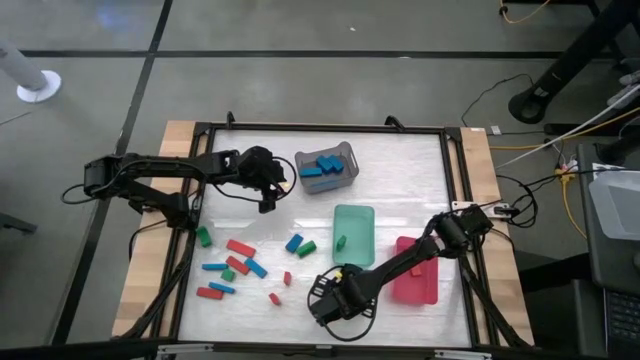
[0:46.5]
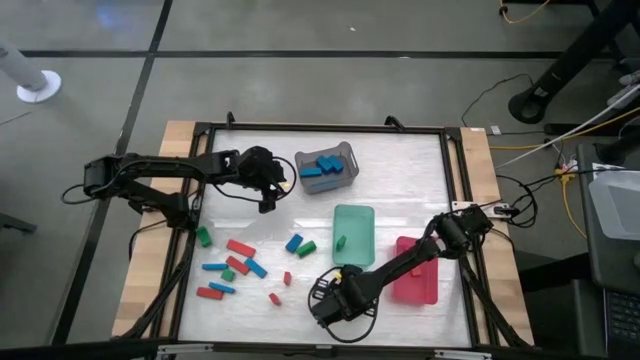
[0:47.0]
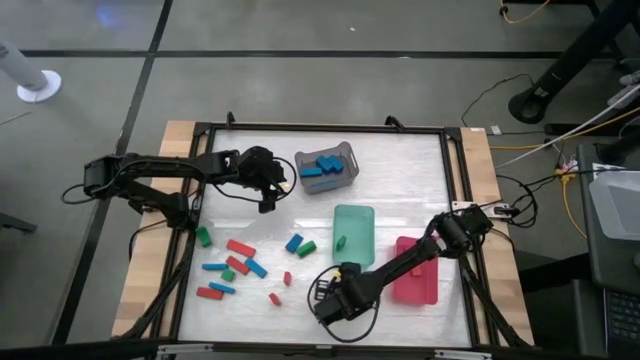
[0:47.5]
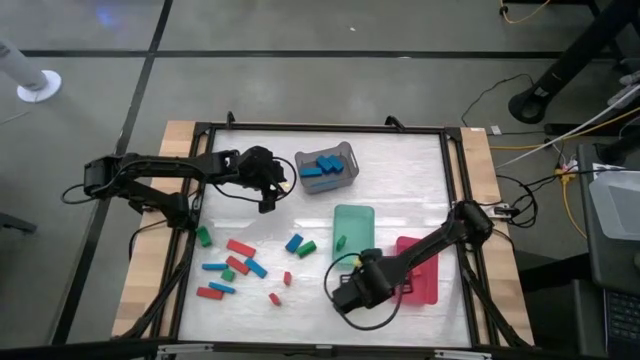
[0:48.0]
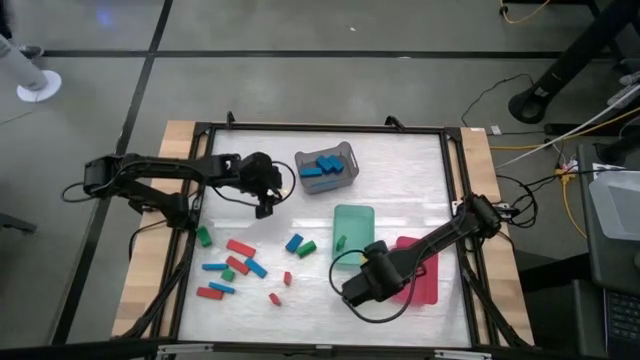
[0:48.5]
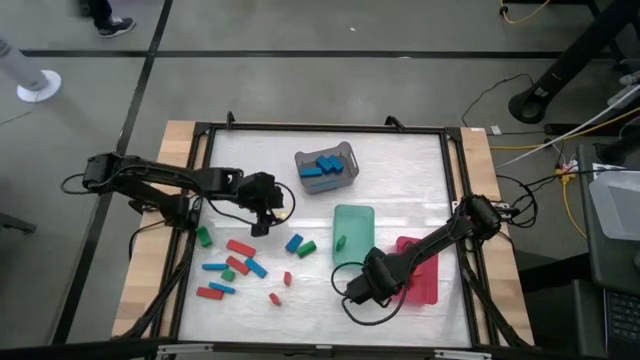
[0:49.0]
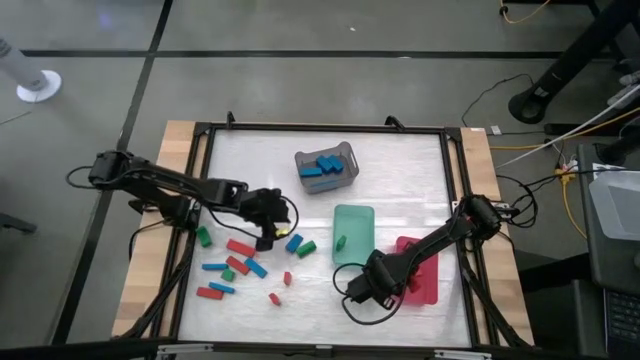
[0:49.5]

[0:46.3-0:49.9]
Task: Sort blocks
Put the red arch block into the pink bin

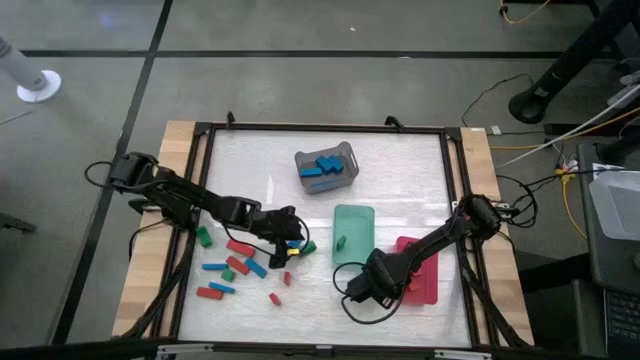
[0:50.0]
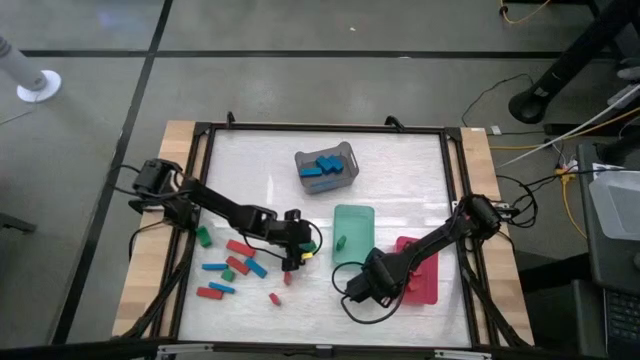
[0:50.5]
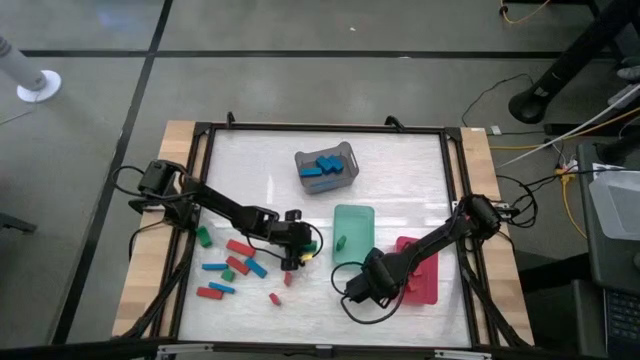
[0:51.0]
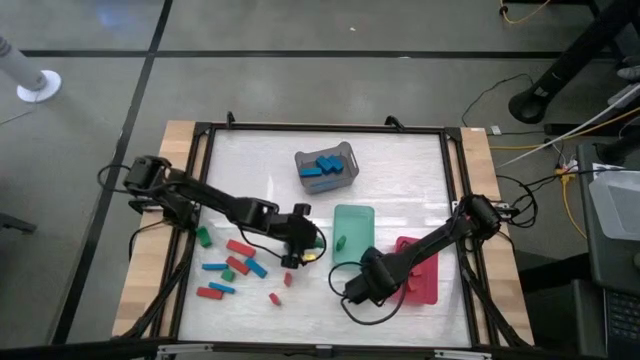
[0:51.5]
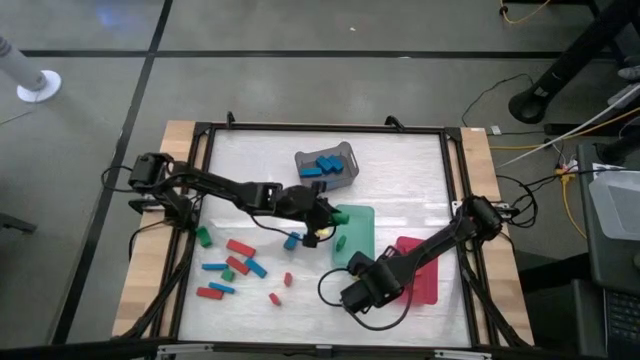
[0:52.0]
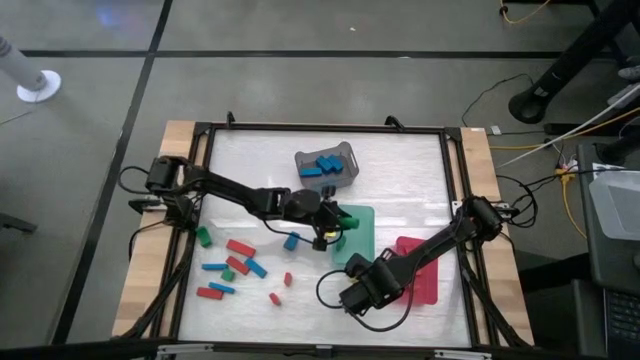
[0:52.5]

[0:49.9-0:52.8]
Put the green cylindrical block into the green bin

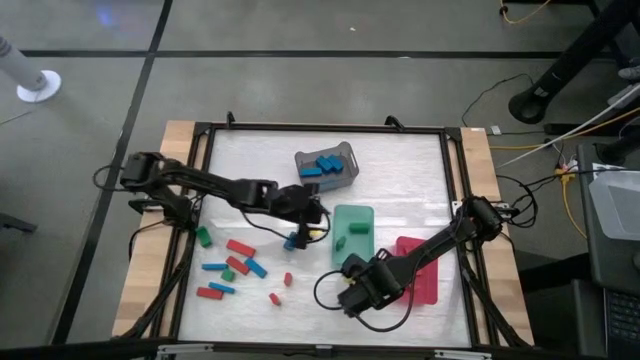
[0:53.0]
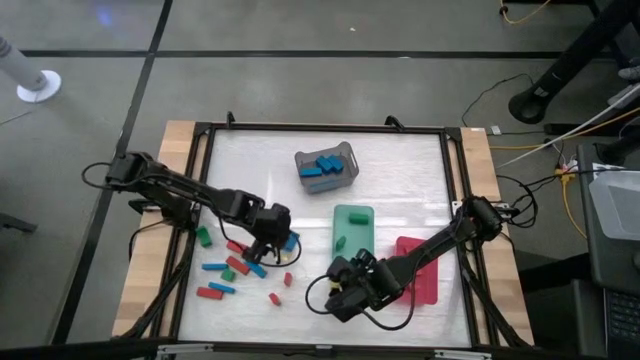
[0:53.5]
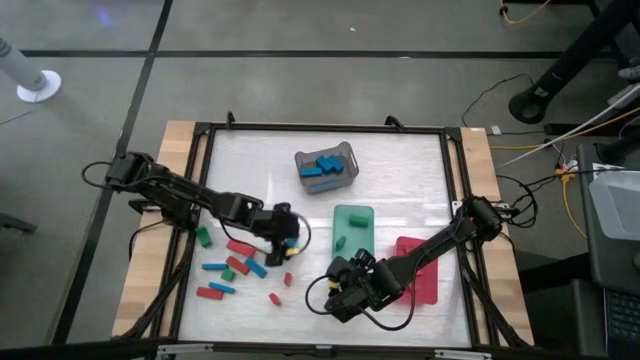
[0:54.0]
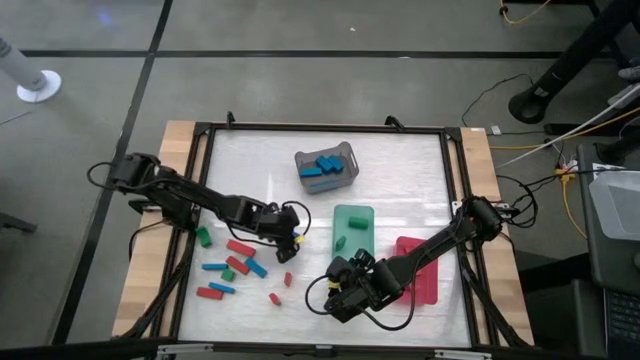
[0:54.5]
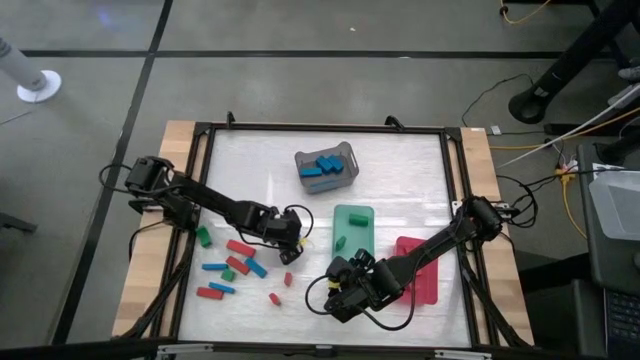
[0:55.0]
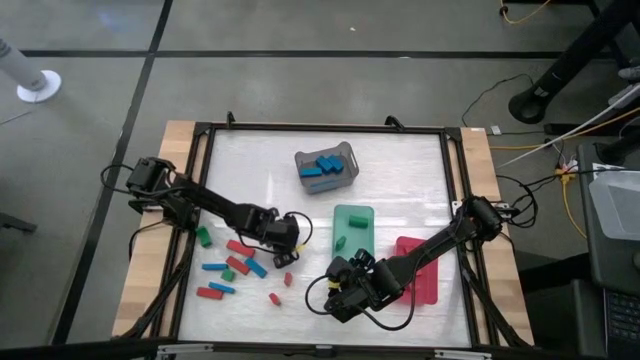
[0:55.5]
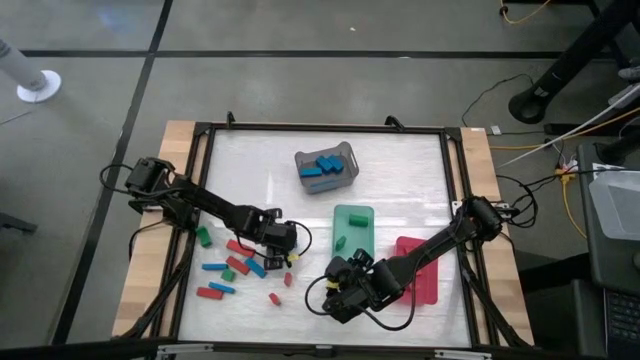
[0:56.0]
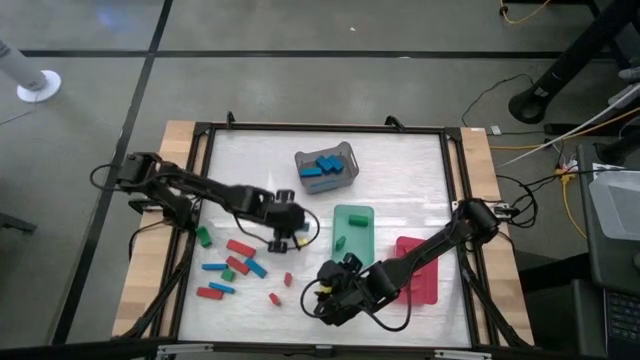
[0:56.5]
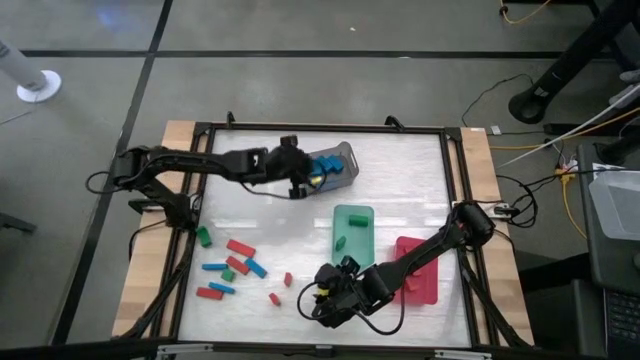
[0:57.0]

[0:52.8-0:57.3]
Put the blue triangular block into the gray bin

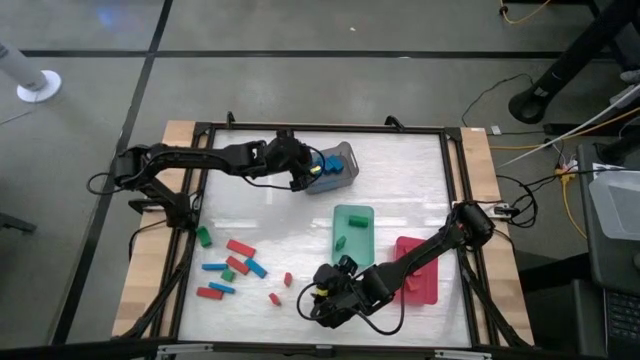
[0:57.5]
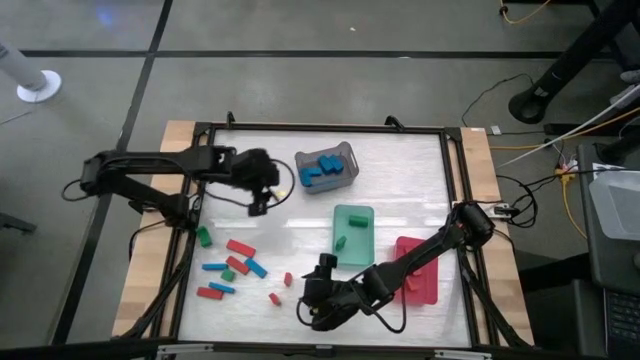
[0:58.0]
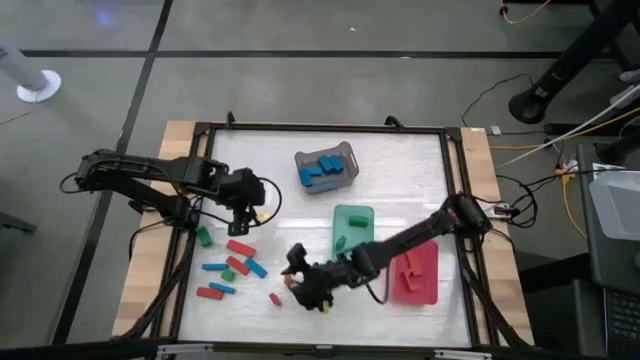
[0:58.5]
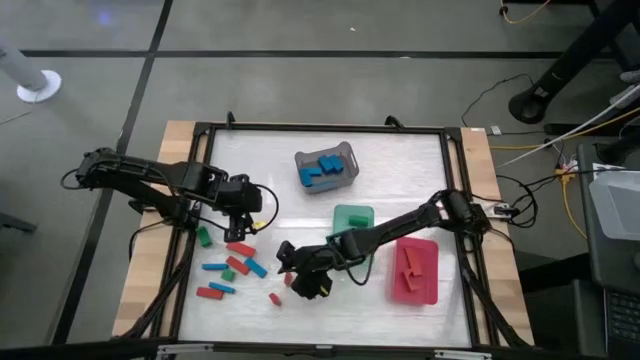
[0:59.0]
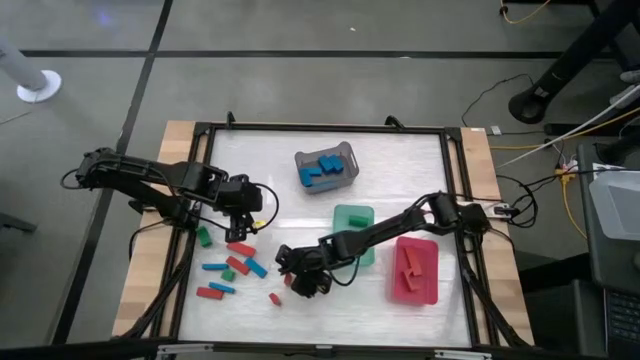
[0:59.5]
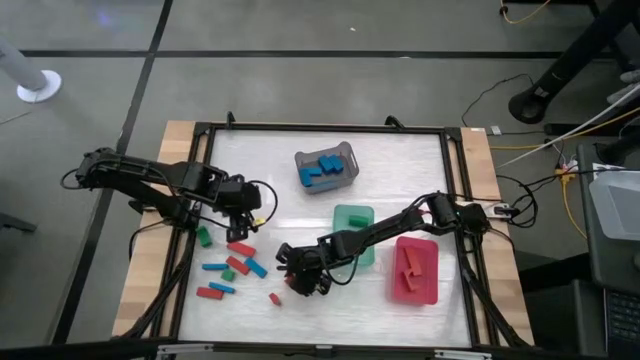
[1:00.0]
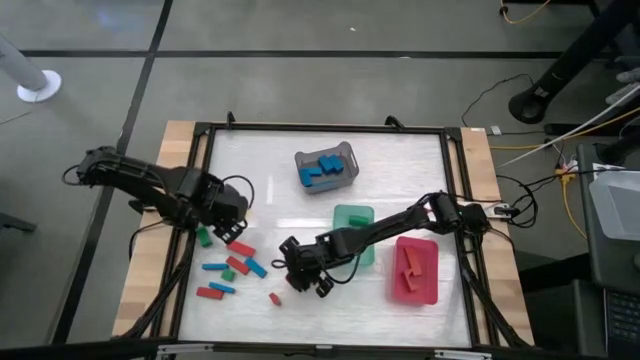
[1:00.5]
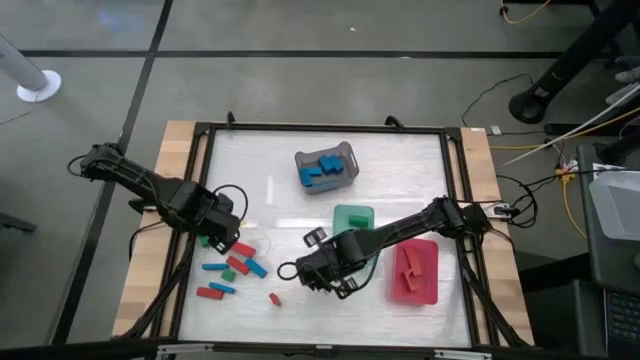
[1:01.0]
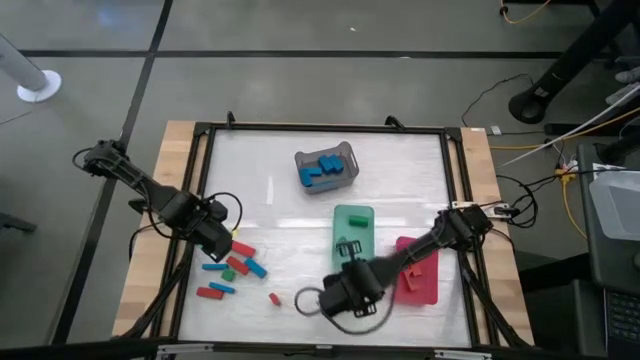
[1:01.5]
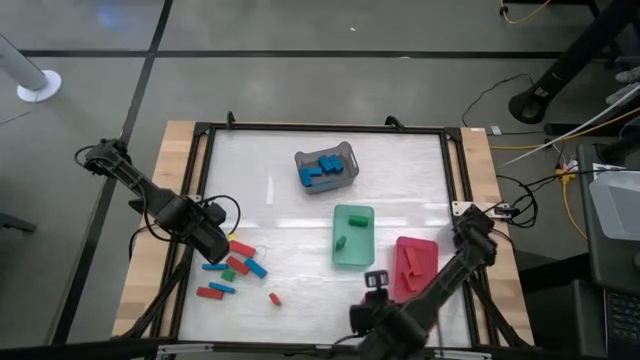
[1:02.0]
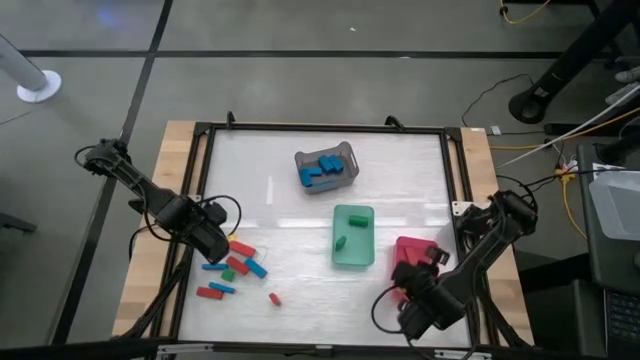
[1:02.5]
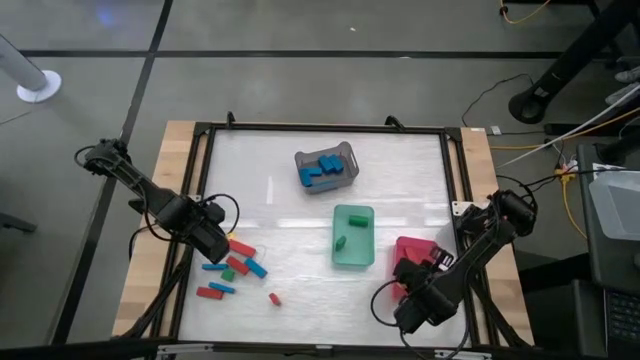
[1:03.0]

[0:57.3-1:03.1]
Put the red block into the pink bin

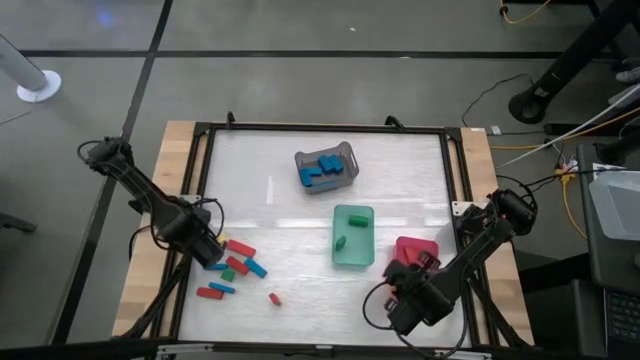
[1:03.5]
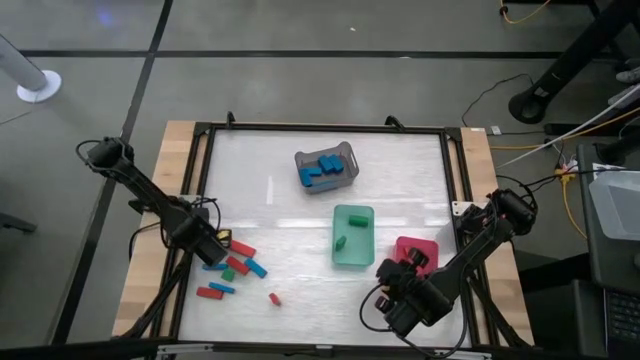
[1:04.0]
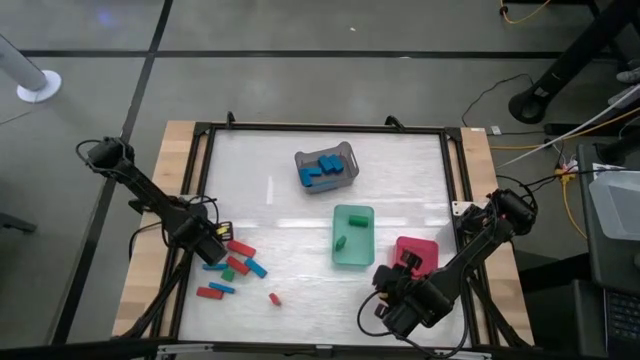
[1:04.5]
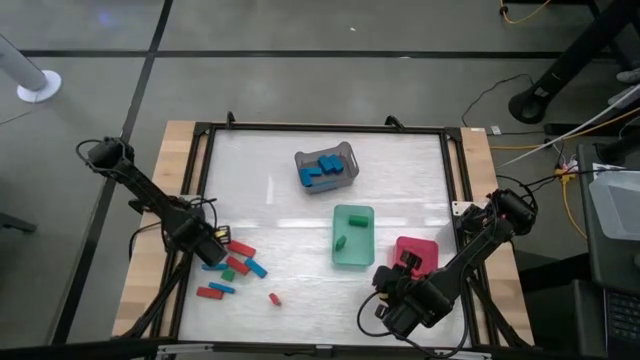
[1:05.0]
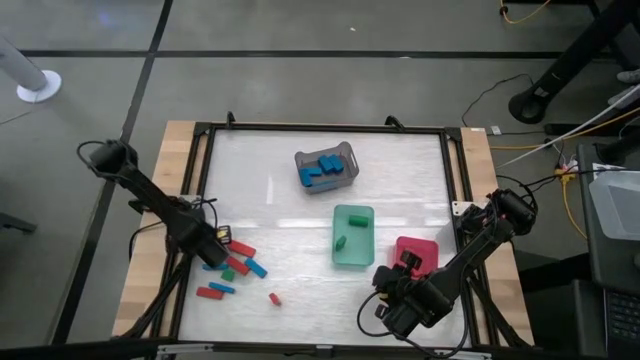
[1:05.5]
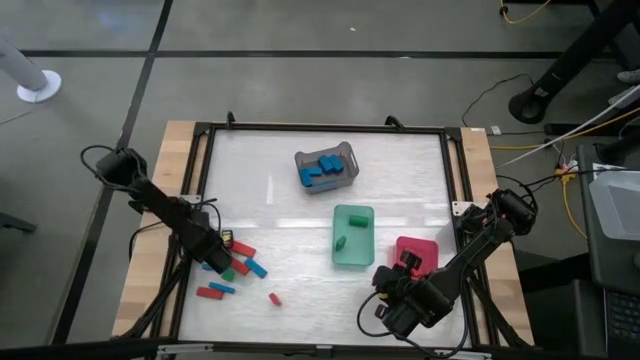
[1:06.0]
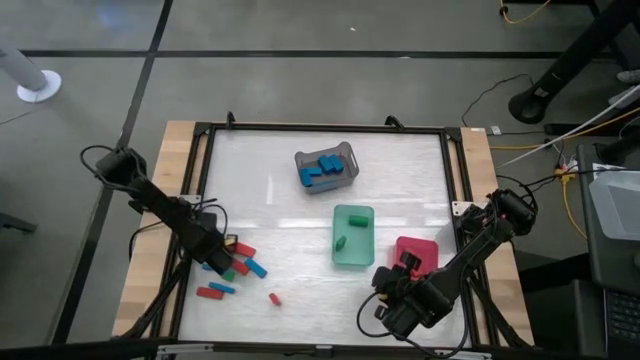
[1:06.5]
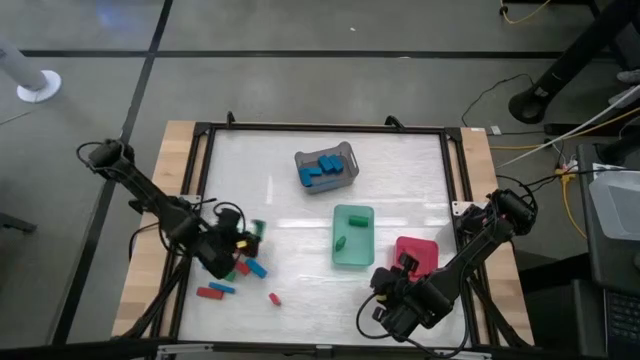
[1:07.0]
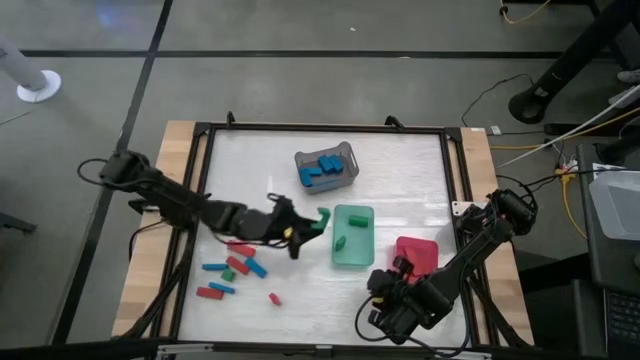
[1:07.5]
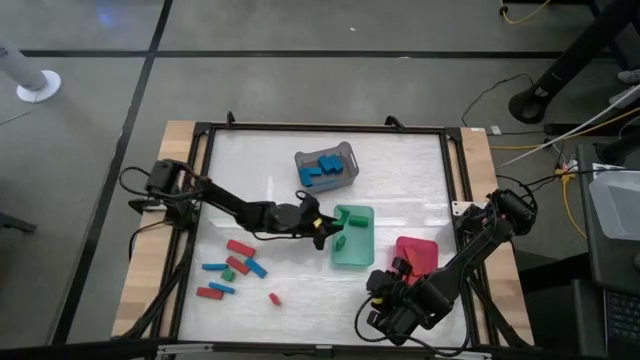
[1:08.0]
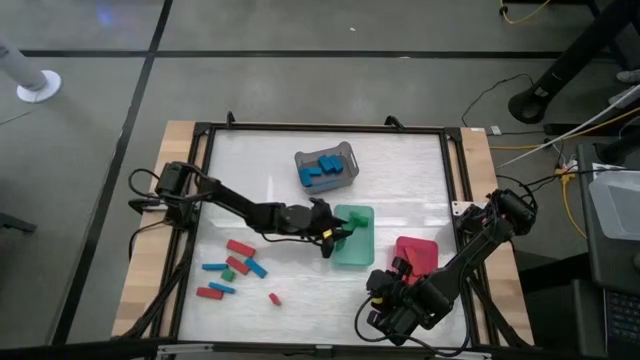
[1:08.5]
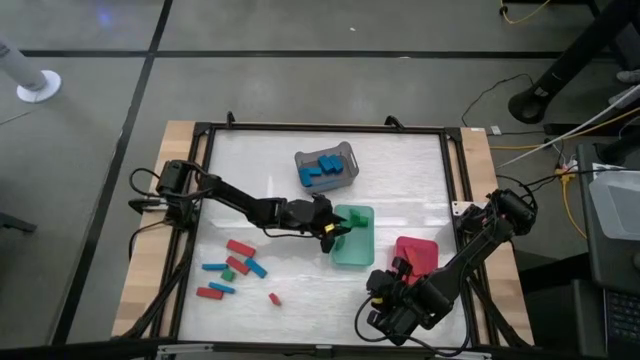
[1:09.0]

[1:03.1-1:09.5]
Put the green arch block into the green bin
